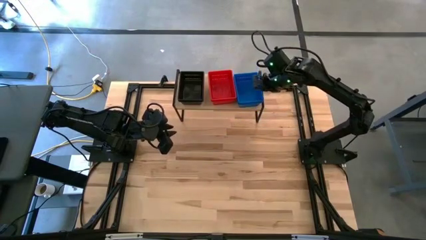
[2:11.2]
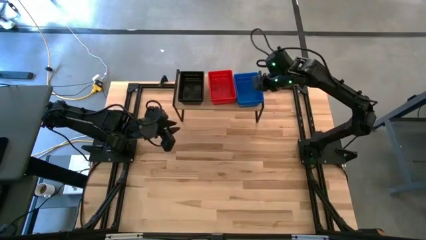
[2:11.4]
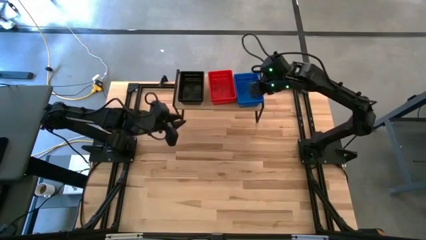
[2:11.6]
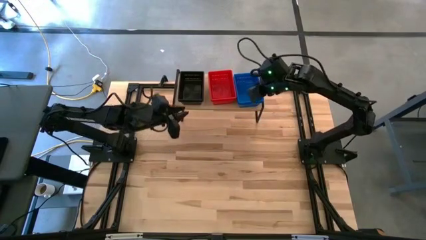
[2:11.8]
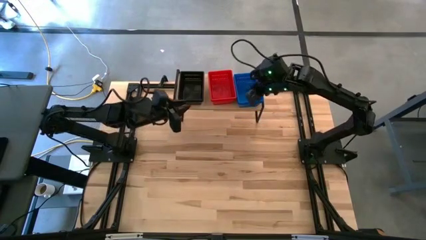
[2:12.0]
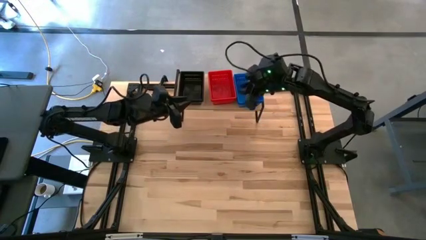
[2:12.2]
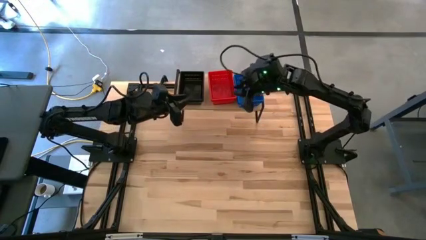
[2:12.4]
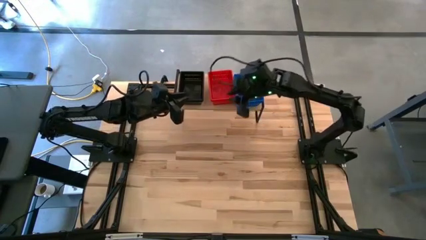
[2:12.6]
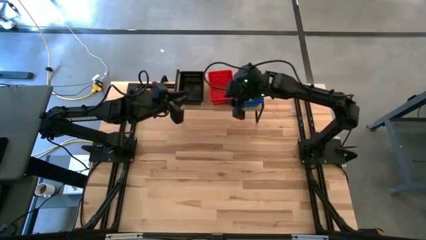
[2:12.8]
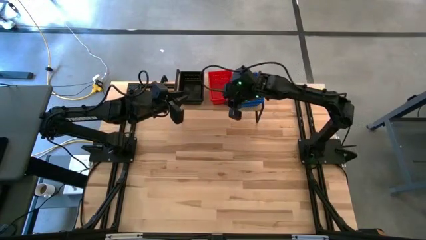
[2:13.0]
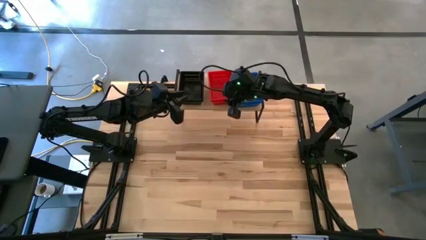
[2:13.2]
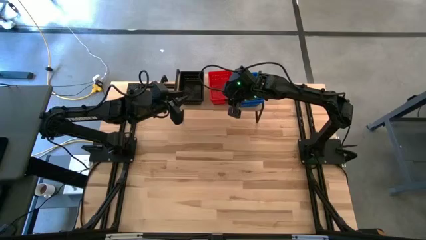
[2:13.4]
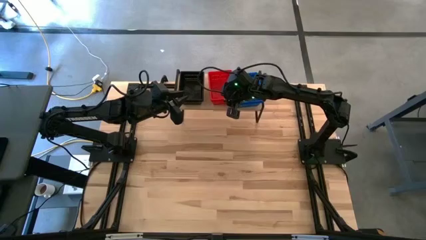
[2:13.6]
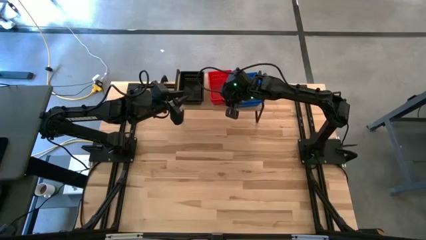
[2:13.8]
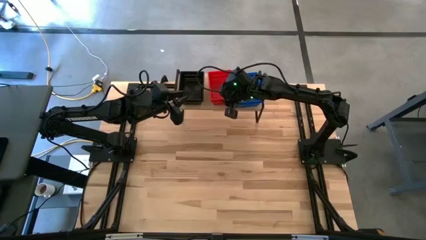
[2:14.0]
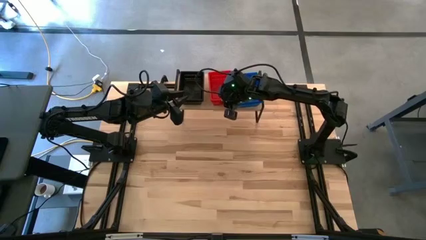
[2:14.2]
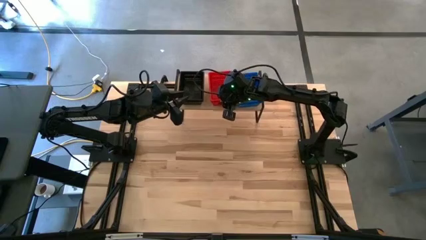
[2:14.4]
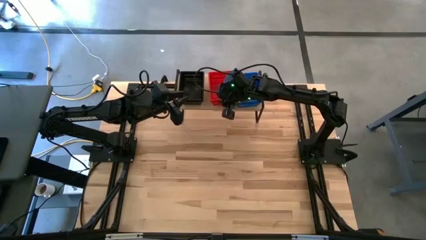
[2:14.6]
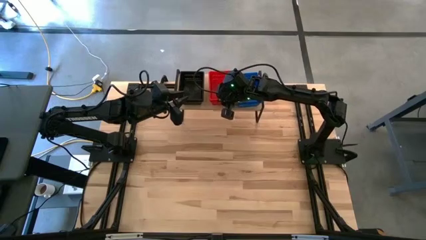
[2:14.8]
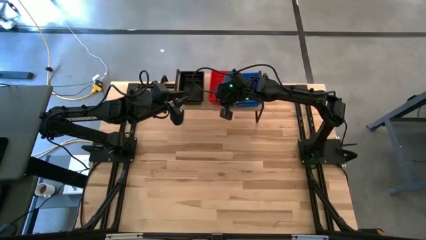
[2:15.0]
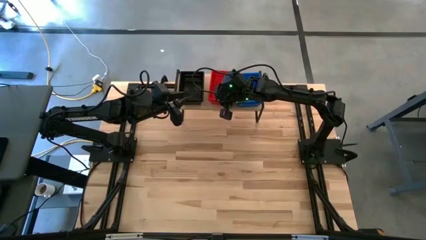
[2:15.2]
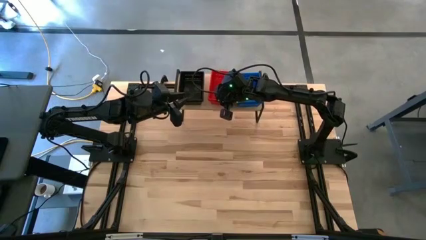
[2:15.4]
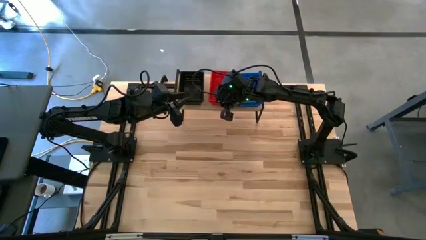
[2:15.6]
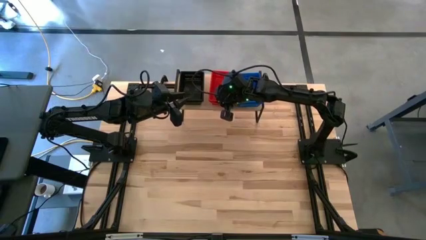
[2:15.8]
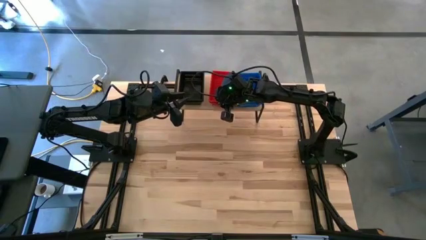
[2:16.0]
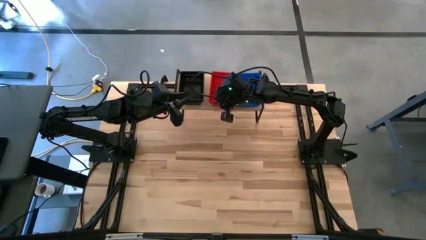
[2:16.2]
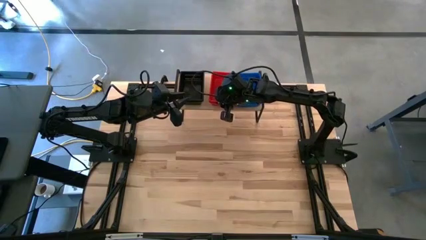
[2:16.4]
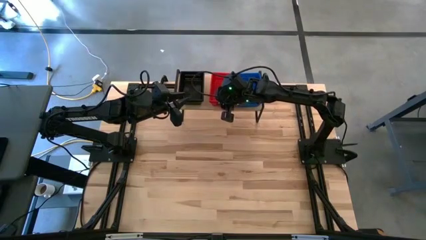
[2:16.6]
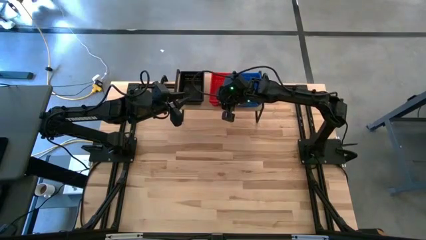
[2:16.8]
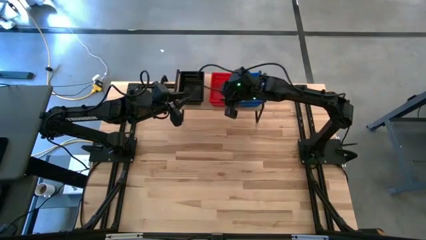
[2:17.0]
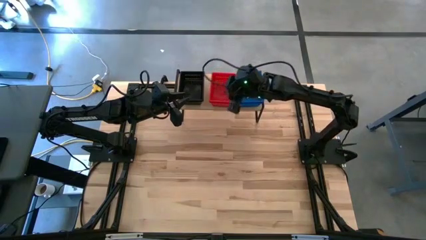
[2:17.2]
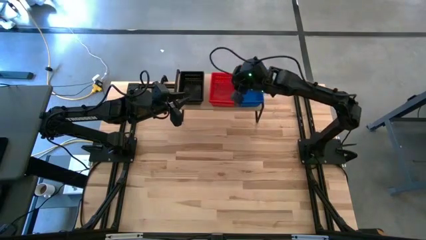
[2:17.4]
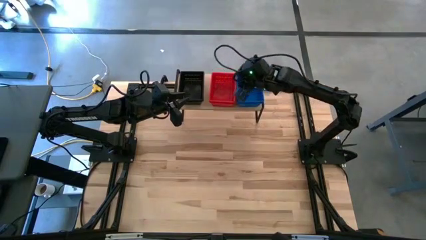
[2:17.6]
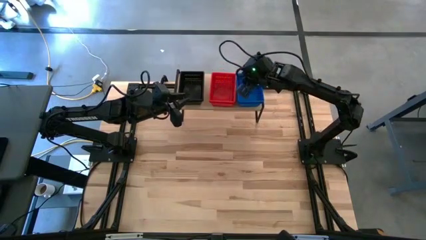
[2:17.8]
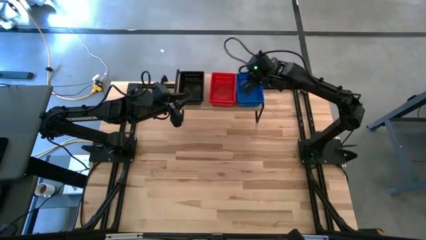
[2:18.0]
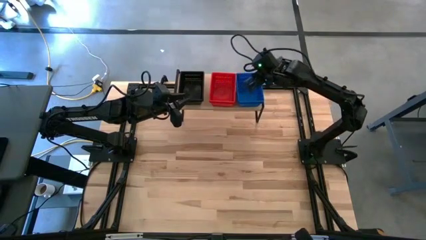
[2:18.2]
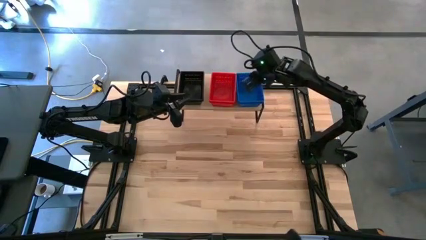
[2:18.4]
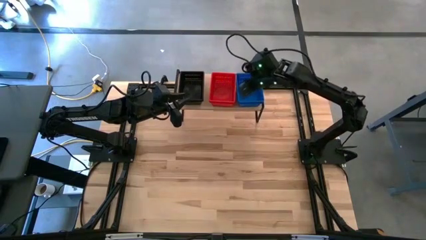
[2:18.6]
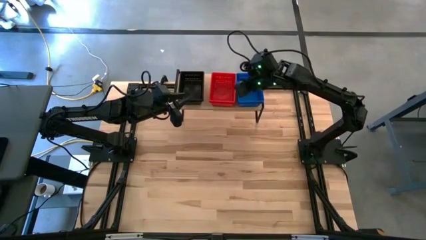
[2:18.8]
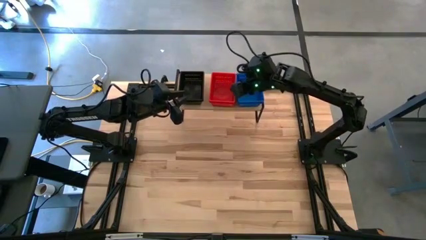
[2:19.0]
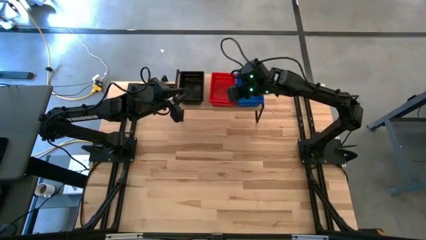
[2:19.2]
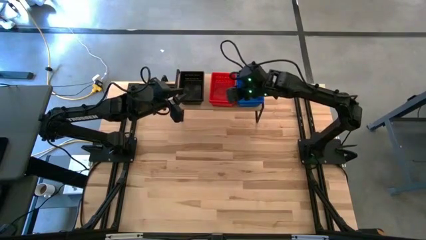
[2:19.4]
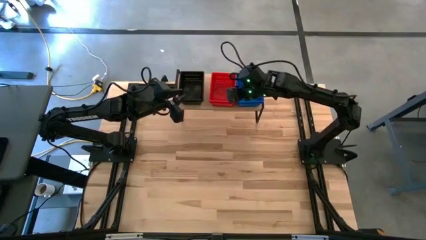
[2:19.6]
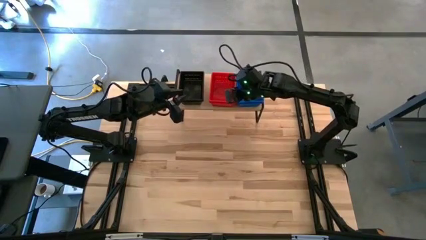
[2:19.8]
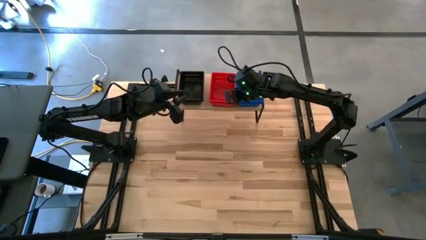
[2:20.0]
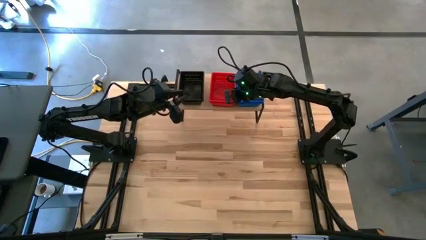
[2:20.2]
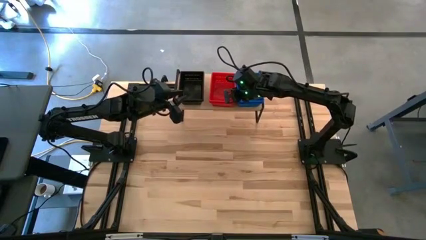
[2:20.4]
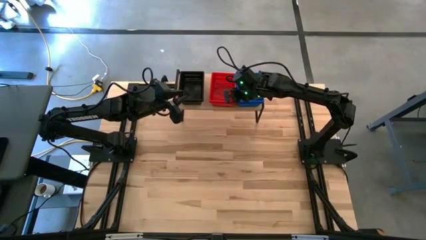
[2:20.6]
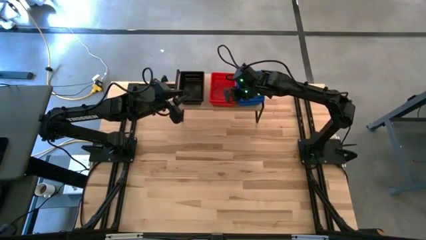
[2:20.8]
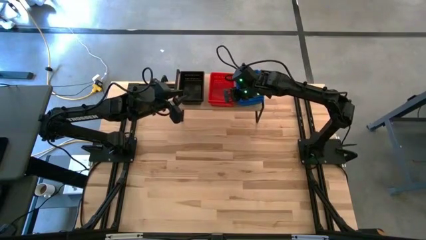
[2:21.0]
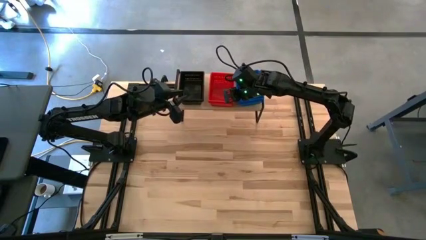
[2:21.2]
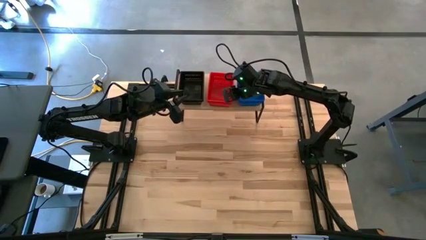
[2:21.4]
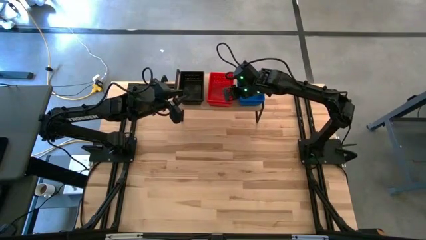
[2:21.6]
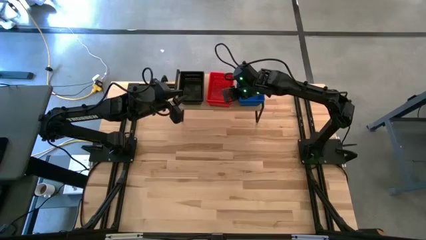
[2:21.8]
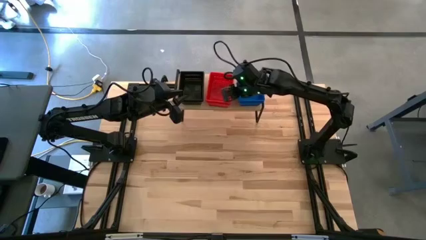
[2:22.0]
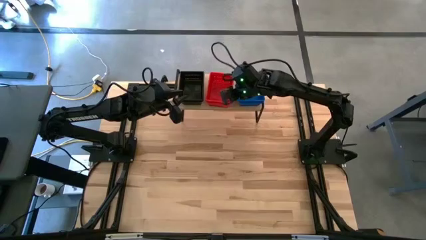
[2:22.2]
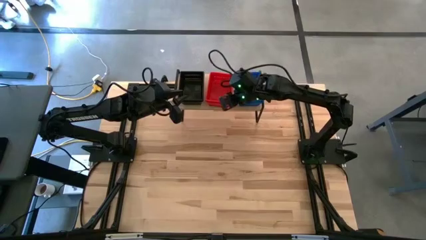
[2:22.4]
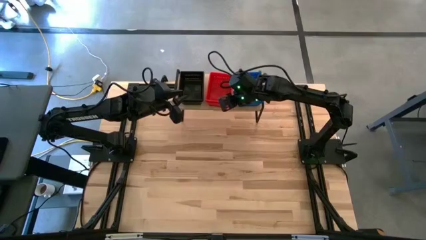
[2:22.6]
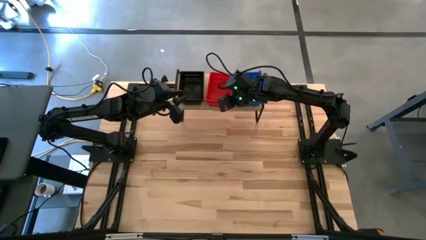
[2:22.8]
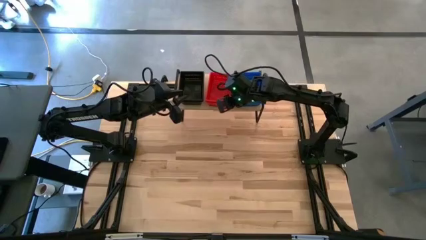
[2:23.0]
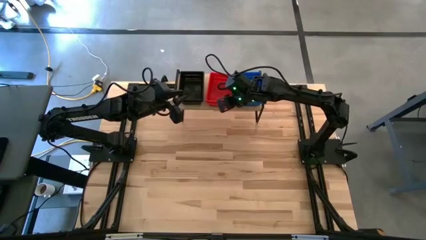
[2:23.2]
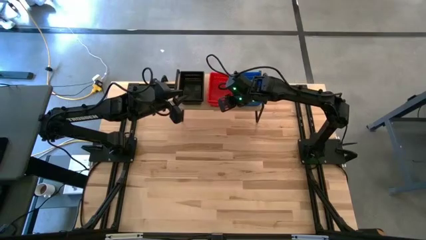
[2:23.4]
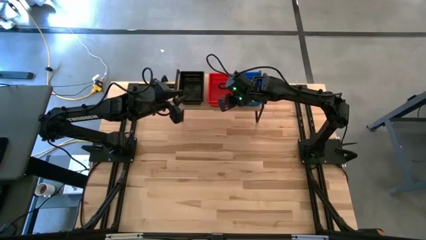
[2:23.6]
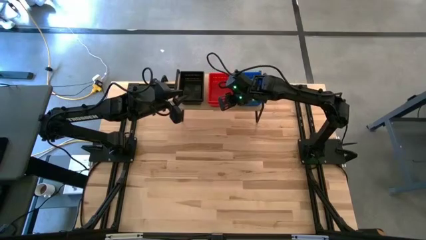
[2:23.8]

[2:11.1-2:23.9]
Task: Stack baskets on shelf by color
Adjust the stacked red bins on the shelf

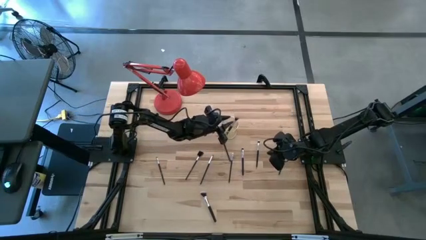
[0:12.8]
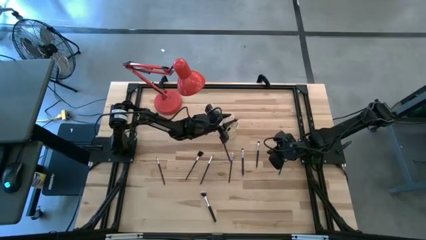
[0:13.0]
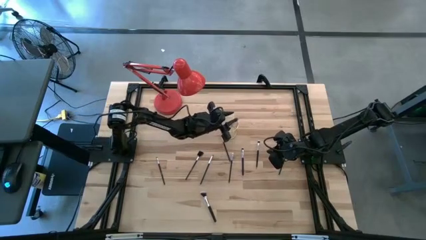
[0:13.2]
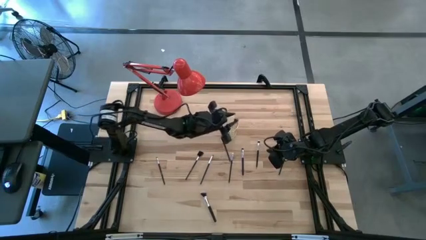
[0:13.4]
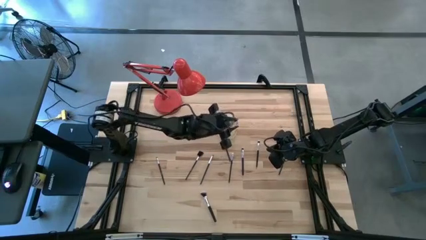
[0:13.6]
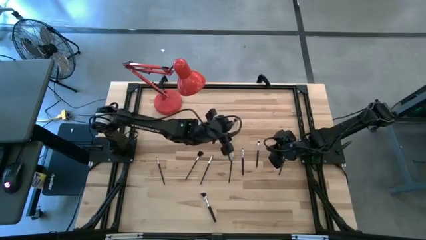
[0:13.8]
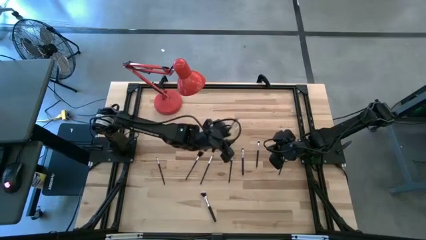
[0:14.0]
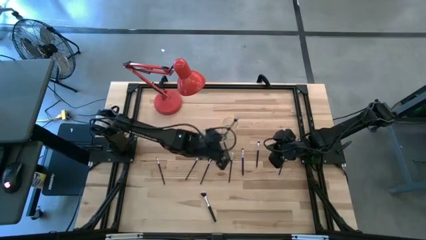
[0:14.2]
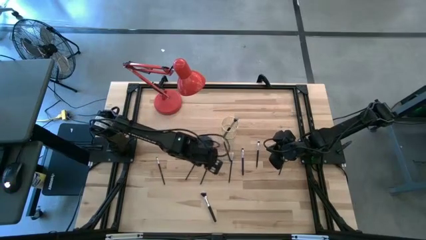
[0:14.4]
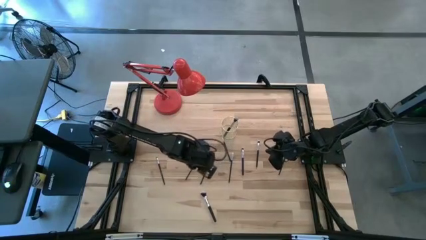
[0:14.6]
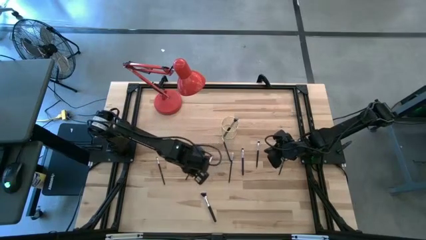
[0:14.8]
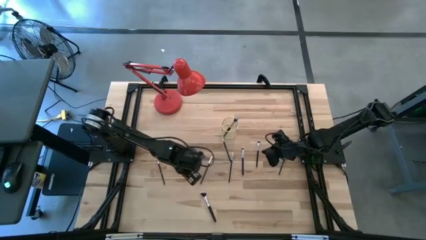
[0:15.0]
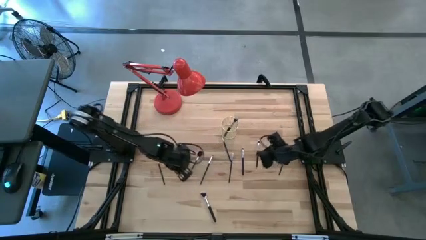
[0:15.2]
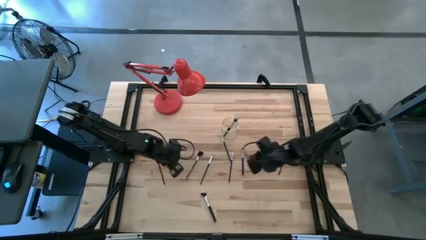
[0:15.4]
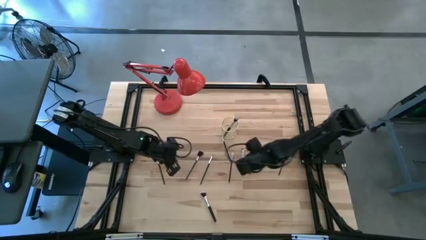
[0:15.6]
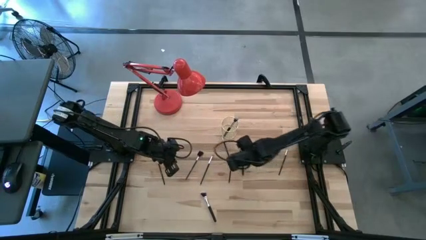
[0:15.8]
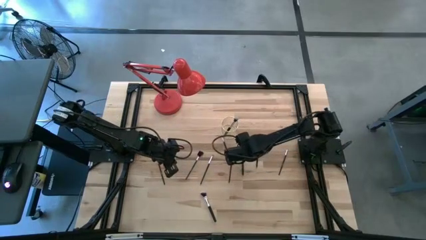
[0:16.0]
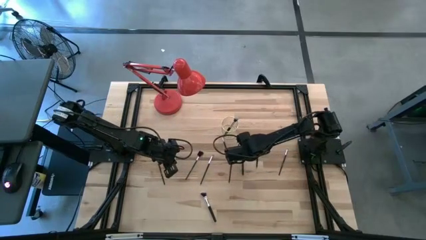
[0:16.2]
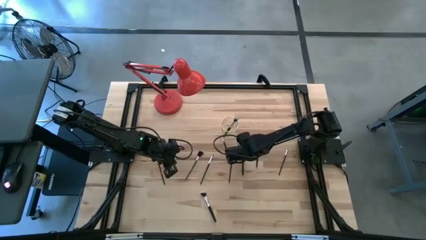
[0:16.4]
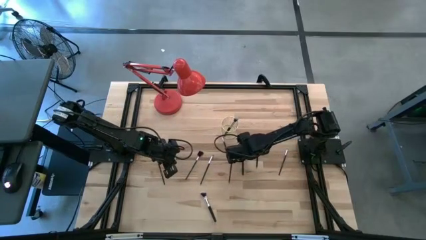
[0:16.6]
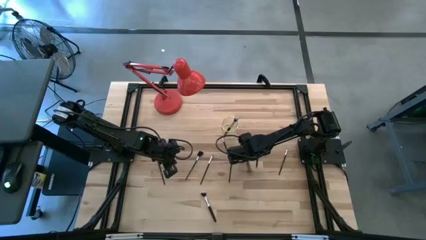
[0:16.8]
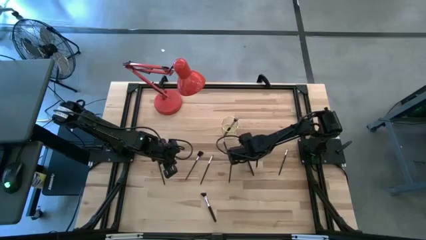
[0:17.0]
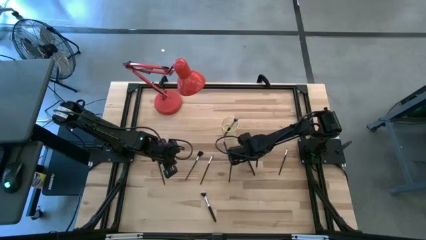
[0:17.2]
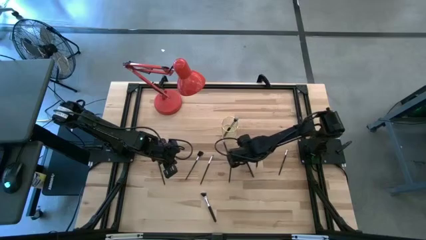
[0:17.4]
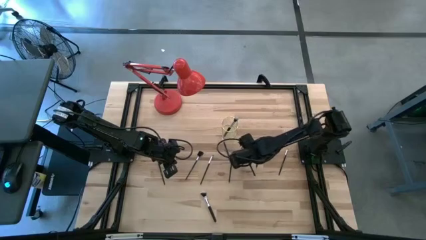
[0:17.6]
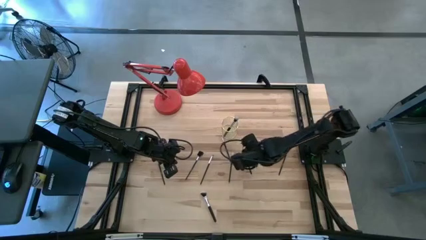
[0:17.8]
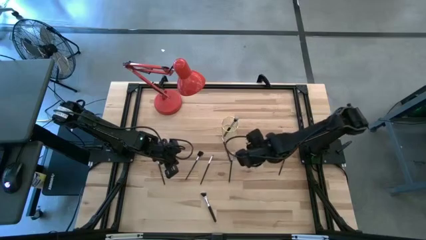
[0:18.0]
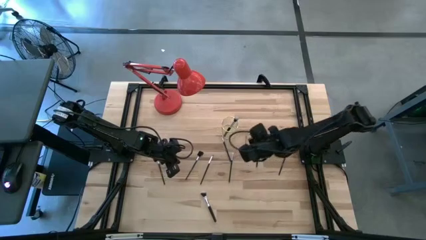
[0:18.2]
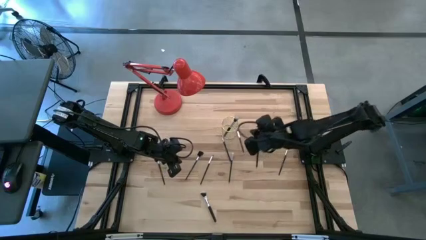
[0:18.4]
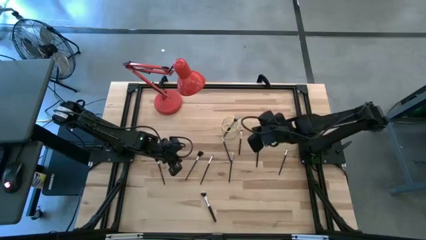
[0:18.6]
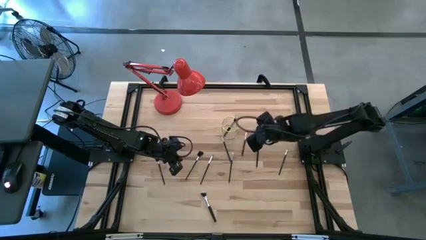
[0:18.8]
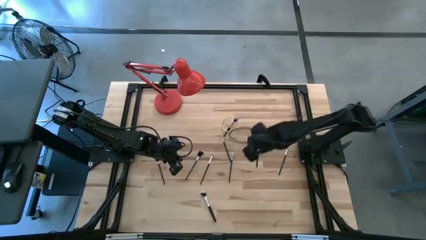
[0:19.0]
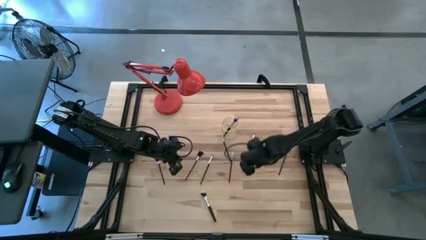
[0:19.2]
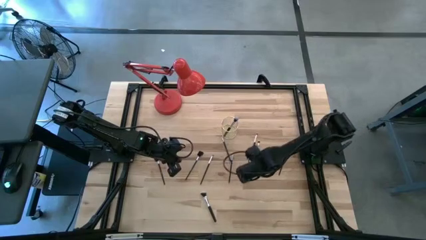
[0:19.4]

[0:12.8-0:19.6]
Task: Put items in baskets/containers
Put the black eyeshadow brush into the yellow container
